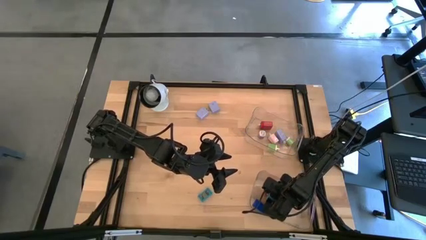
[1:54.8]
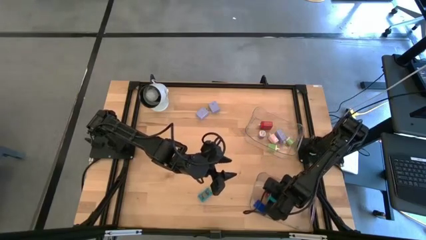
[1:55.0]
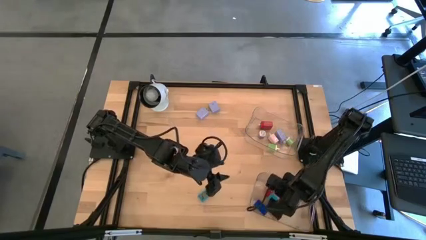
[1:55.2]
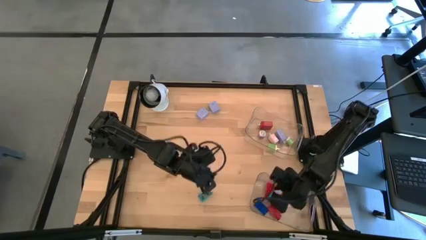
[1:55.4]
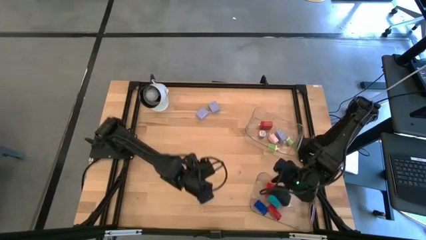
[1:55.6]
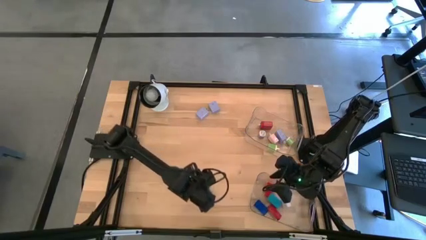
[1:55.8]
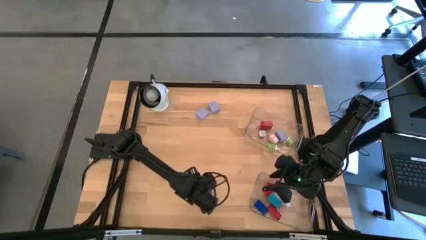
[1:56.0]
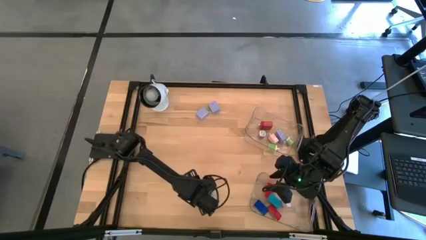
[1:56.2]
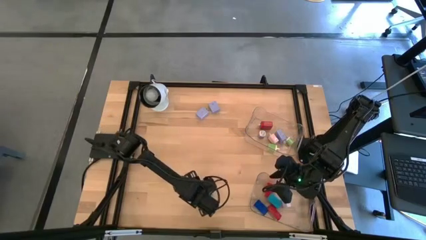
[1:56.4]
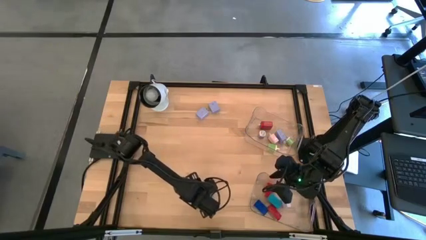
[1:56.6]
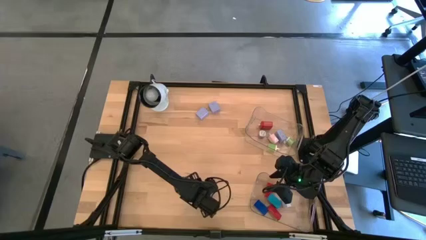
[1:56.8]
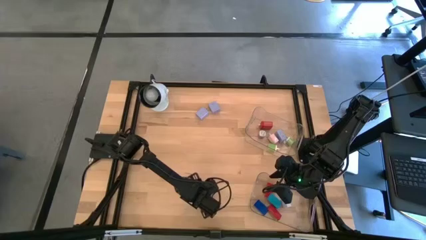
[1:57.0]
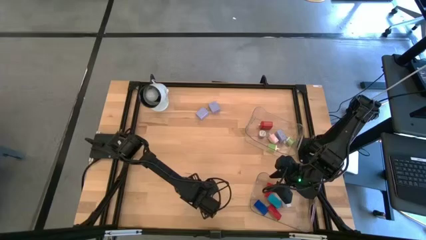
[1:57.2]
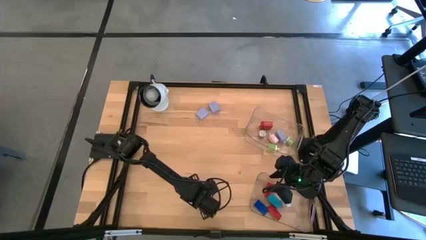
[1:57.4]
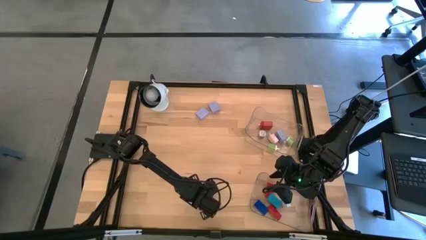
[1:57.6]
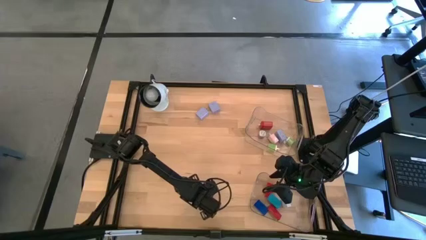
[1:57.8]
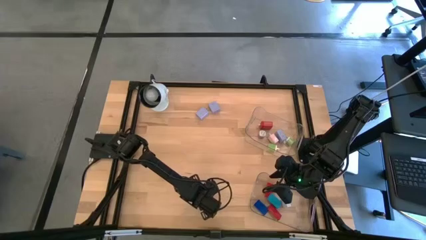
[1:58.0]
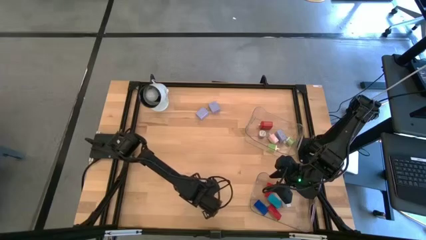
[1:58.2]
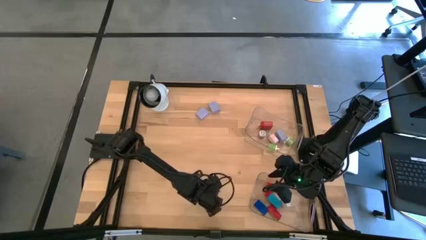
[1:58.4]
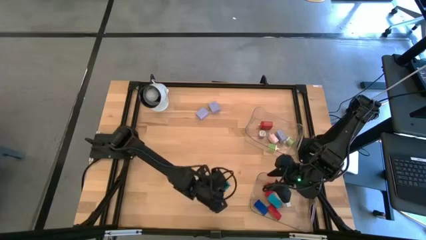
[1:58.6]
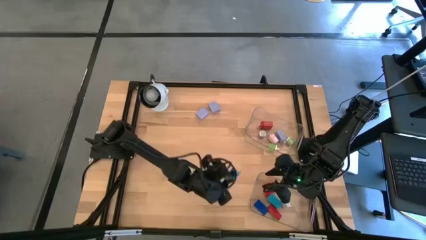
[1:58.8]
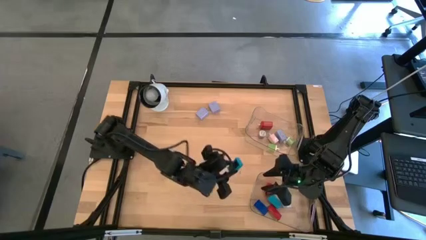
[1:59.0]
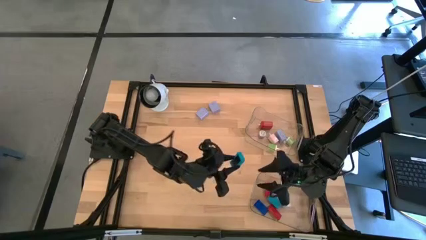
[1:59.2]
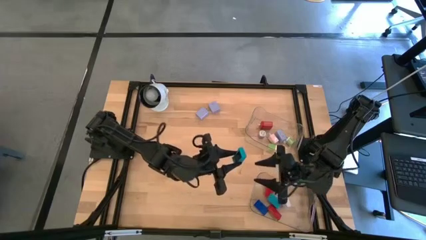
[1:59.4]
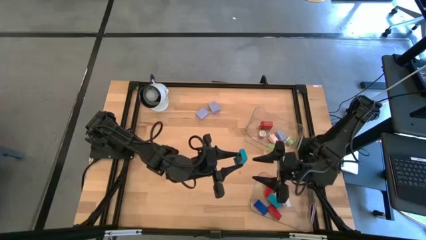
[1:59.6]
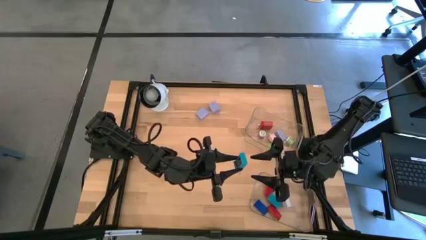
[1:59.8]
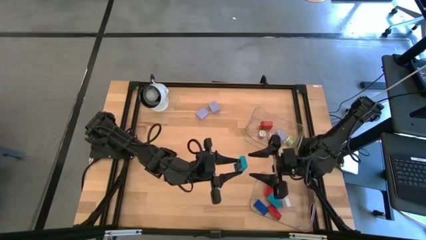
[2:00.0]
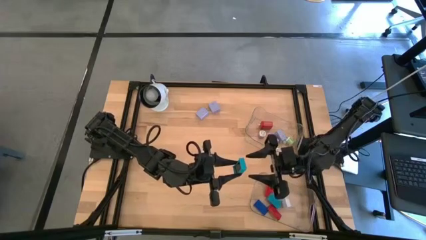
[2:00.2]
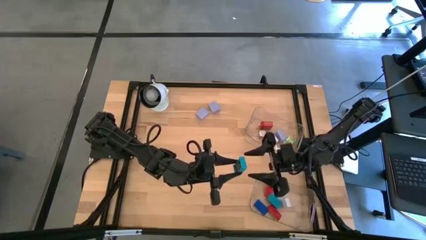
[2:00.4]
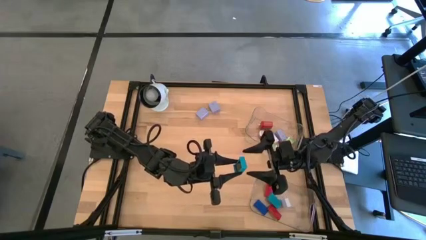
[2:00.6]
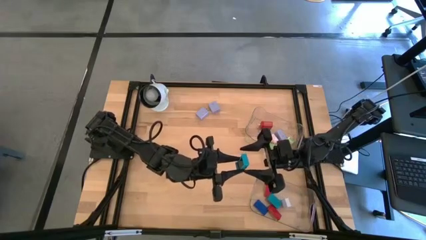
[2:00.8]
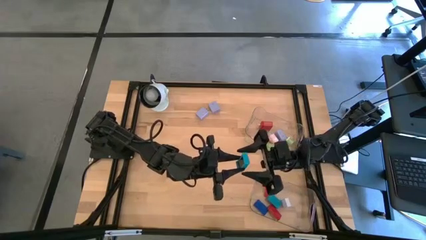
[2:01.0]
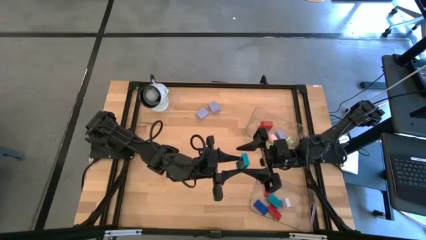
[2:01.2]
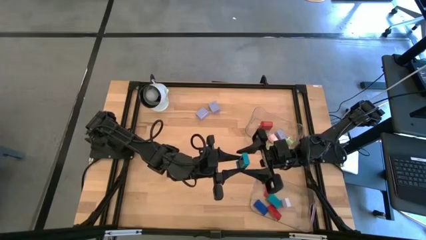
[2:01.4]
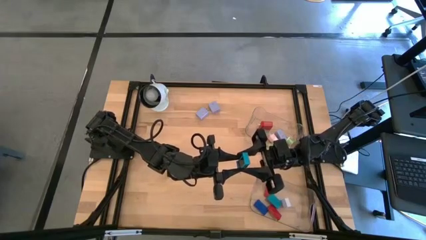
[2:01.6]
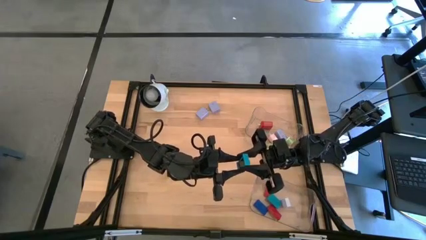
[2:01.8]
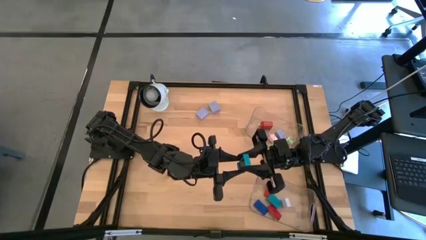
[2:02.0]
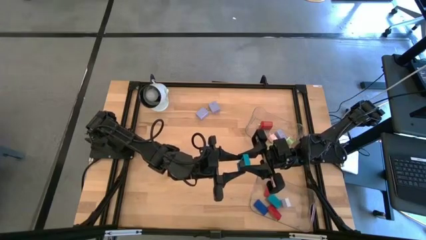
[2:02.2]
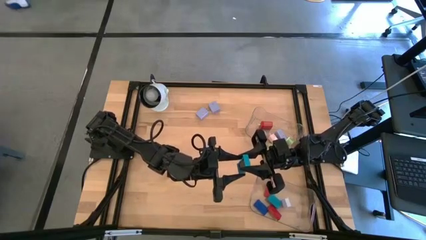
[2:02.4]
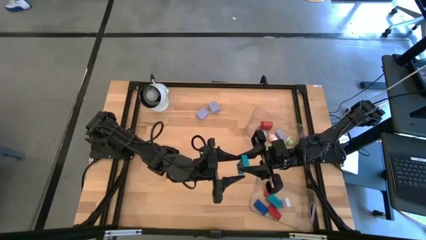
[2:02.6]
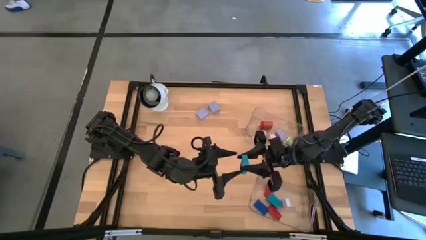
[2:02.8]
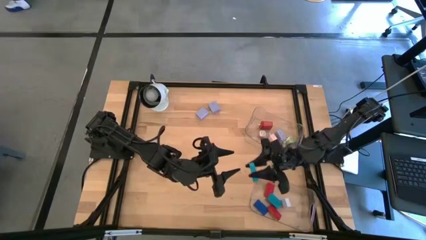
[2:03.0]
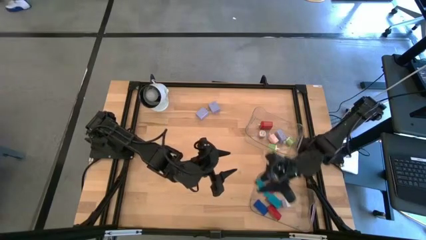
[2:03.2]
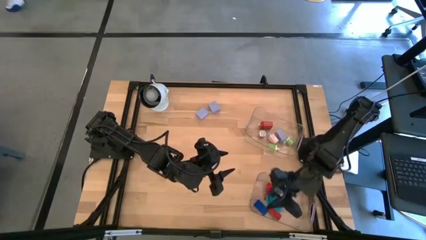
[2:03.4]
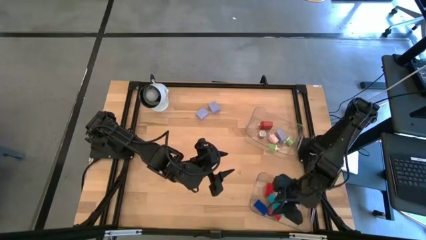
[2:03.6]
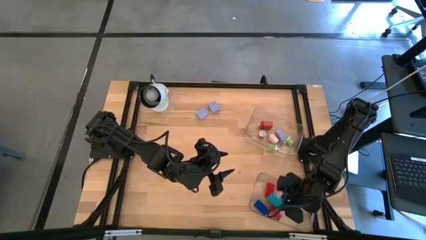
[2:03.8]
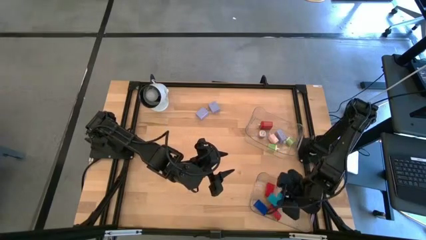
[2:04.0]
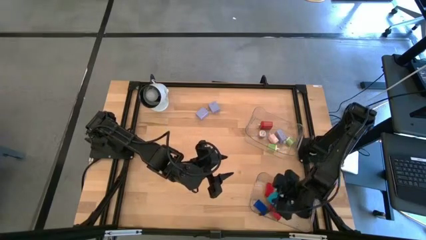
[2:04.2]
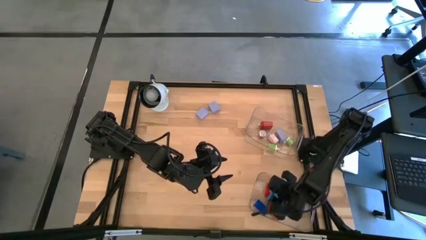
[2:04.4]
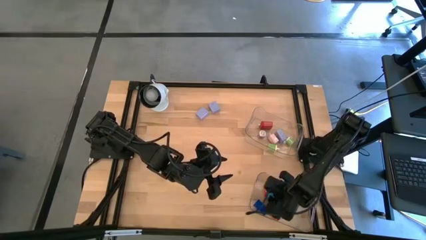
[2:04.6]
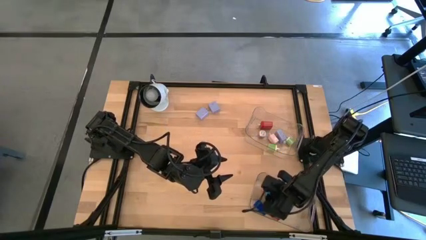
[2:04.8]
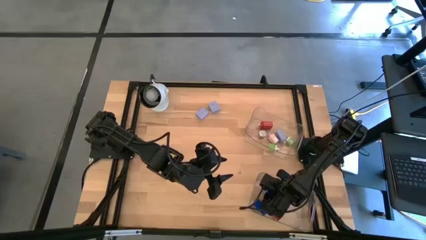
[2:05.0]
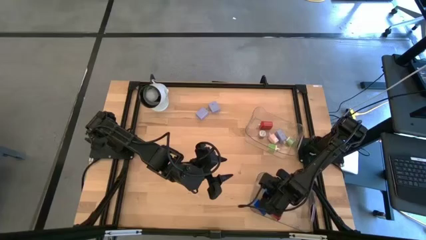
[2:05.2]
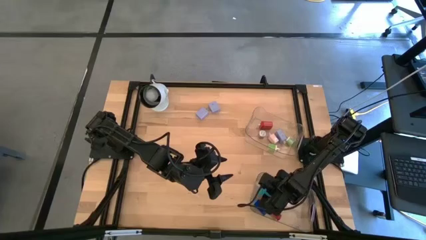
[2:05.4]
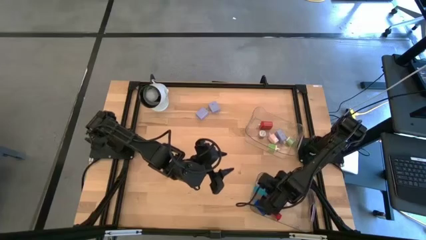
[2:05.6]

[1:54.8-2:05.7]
Task: Pick & Place Office items
Put the light blue digital clock into the bottom transparent bin

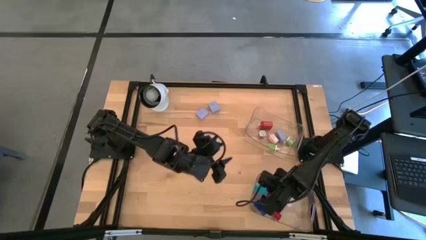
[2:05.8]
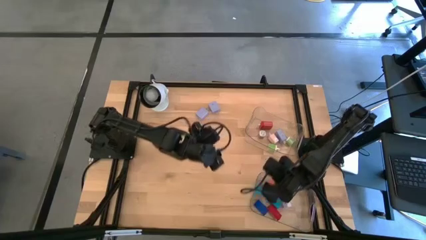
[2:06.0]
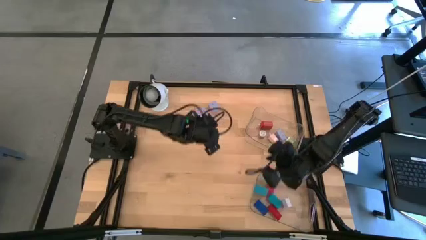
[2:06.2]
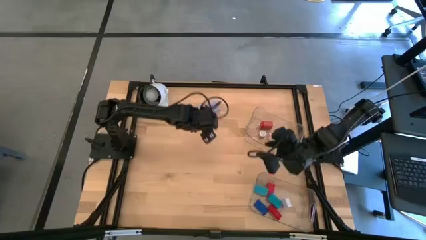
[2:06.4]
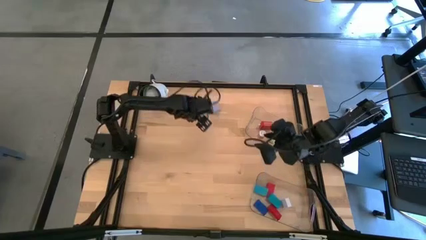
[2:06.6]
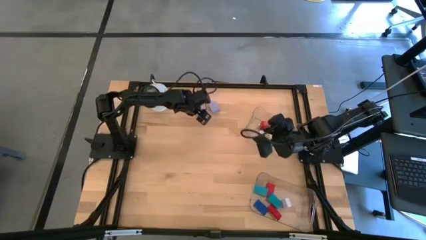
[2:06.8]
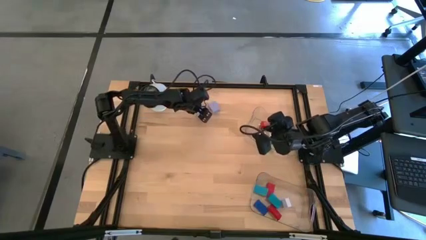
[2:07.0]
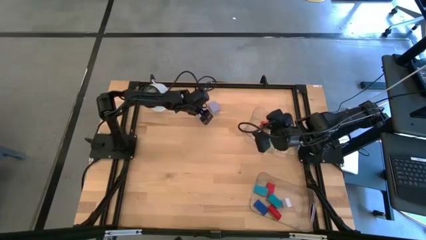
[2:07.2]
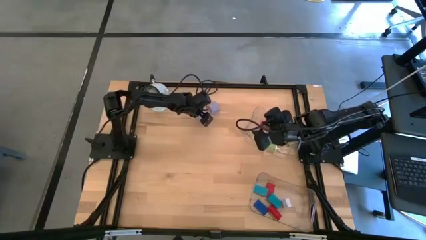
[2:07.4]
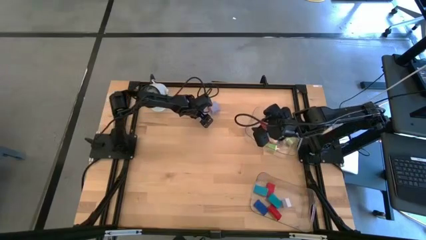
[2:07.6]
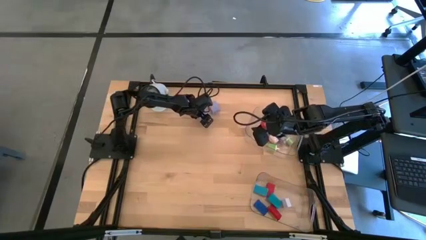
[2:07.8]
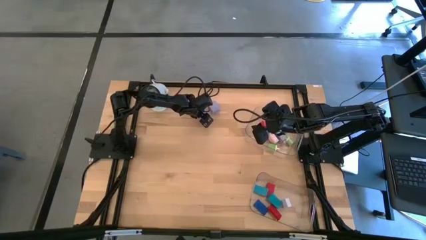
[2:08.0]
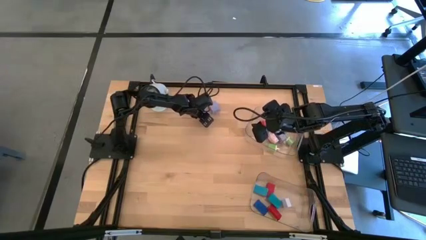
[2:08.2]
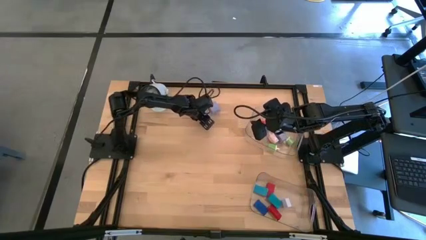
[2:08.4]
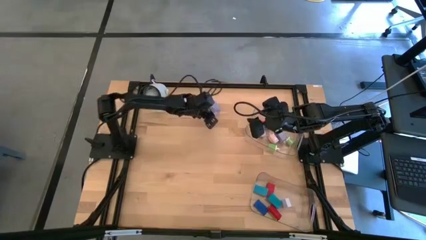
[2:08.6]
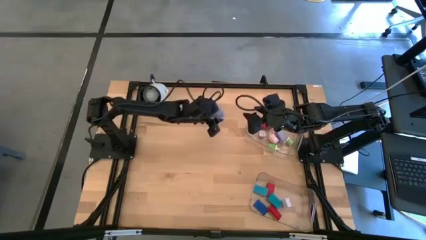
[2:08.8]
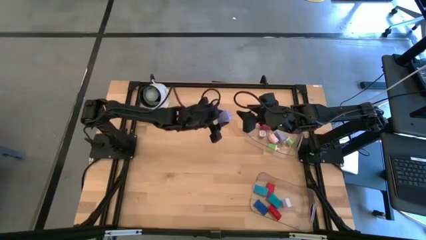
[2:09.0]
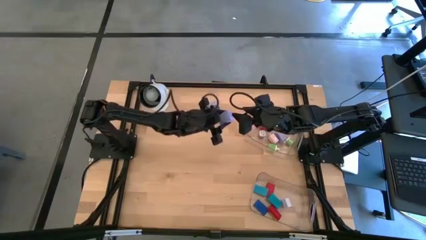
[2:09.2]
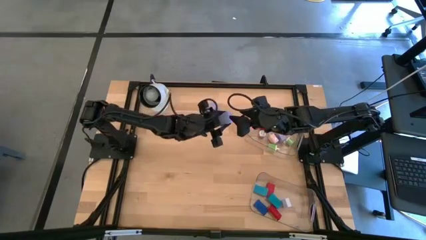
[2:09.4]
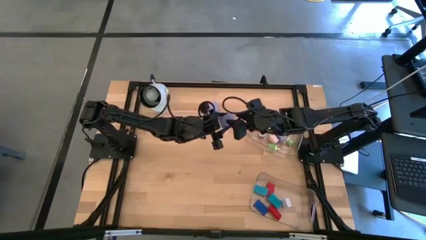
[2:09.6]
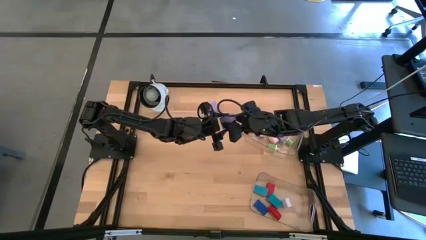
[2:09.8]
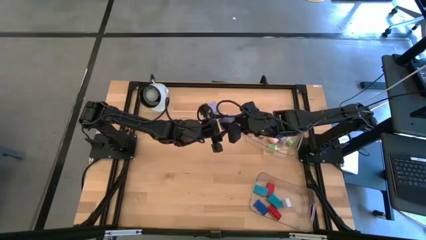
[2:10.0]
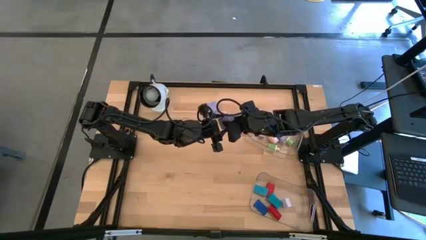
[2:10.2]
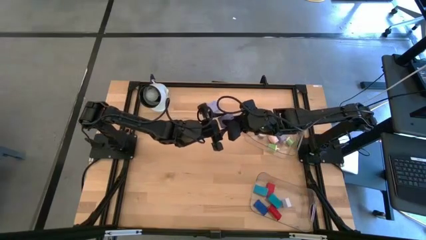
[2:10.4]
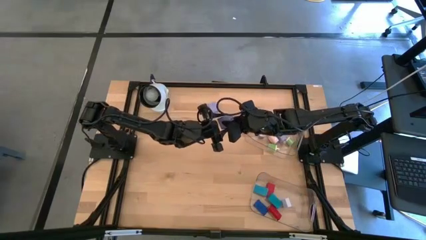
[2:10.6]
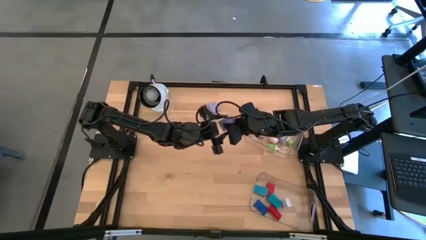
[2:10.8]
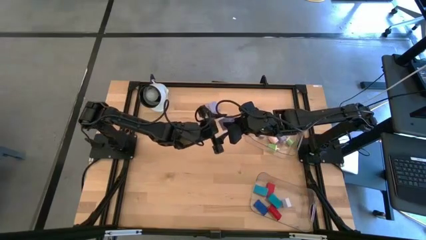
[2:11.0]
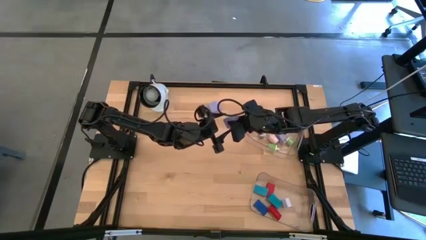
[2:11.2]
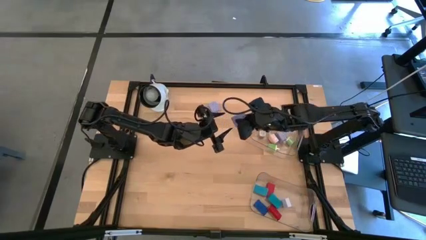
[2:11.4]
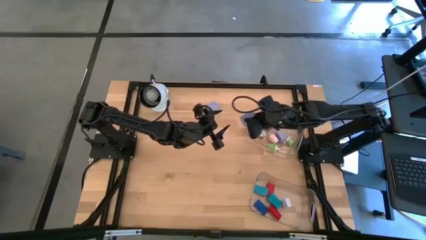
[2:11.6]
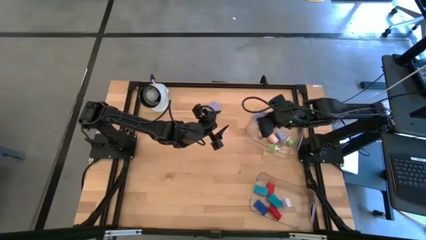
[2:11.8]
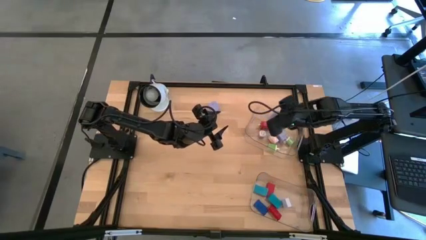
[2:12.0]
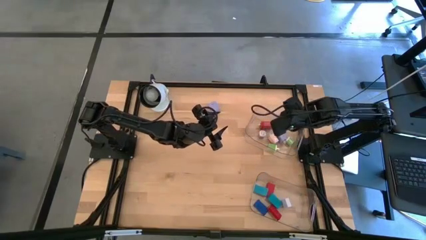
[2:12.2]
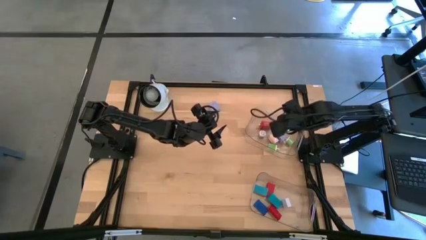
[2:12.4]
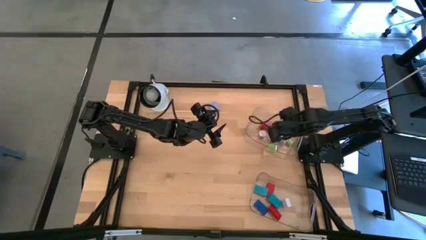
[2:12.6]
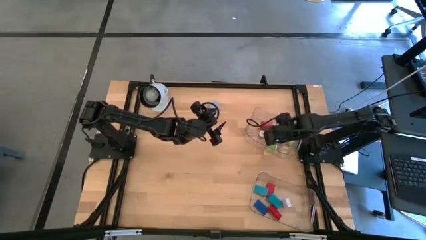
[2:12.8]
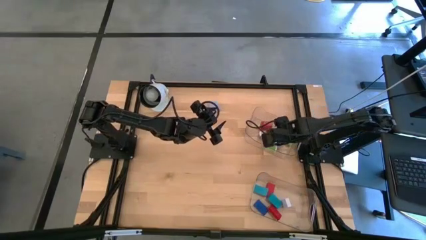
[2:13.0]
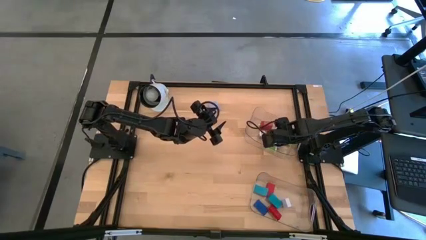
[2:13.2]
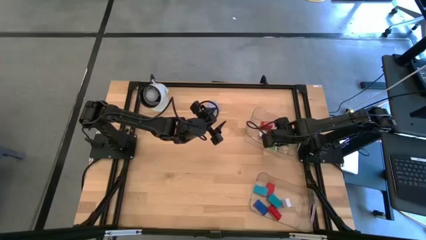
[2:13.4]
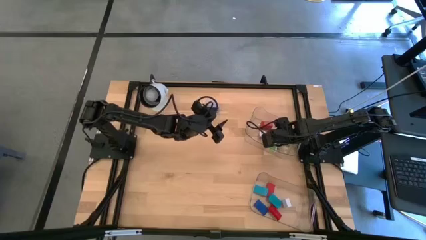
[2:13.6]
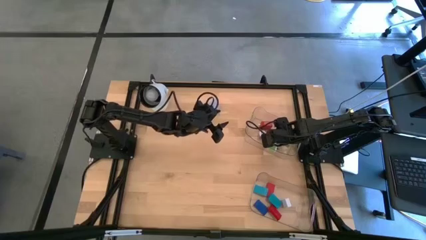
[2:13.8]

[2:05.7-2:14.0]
Put the left blue charger adapter into the top transparent bin
